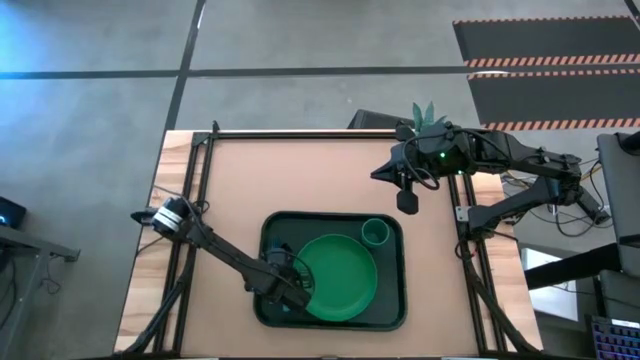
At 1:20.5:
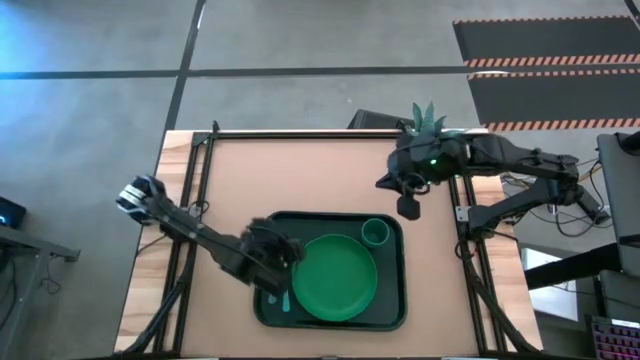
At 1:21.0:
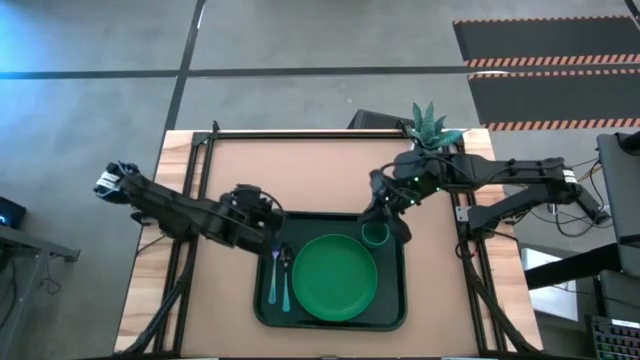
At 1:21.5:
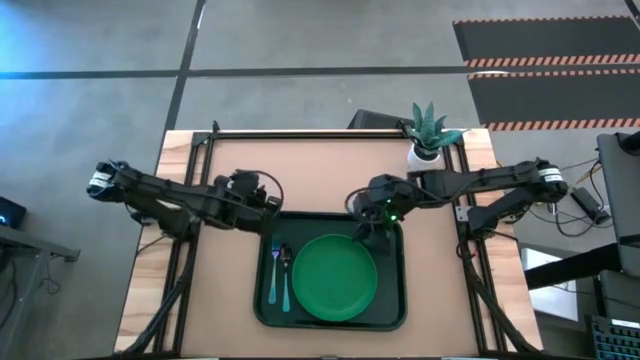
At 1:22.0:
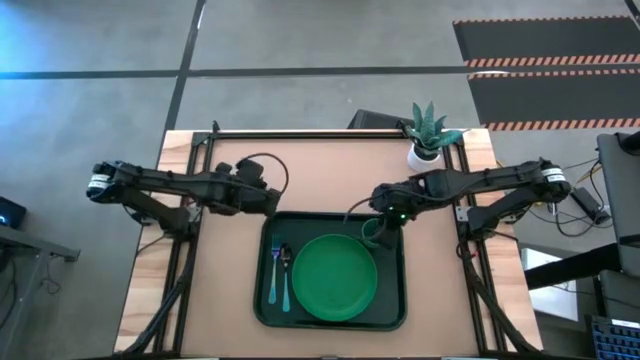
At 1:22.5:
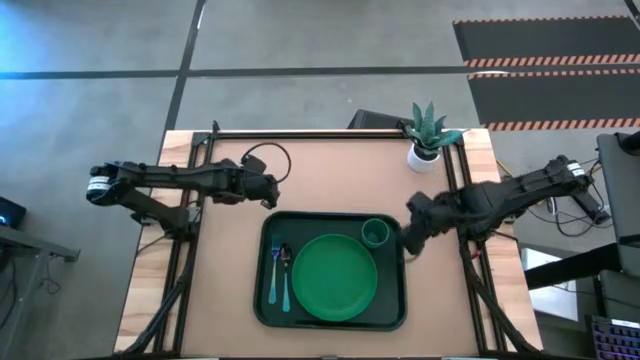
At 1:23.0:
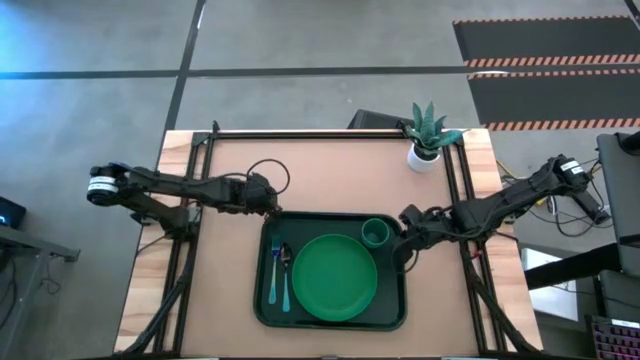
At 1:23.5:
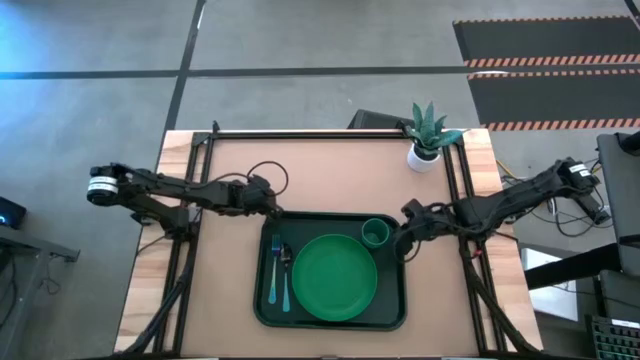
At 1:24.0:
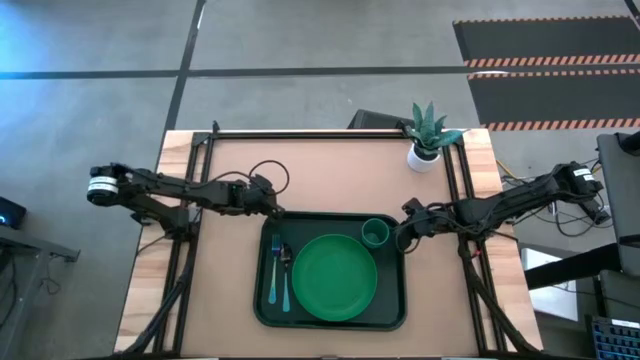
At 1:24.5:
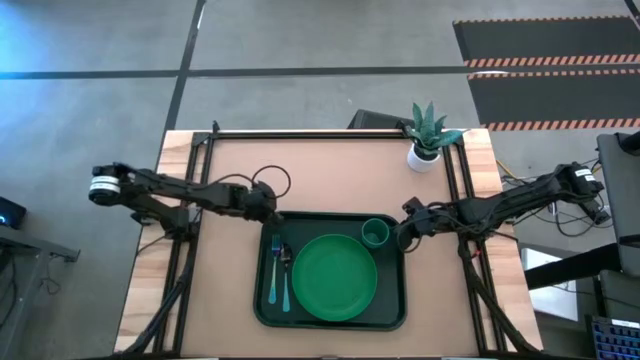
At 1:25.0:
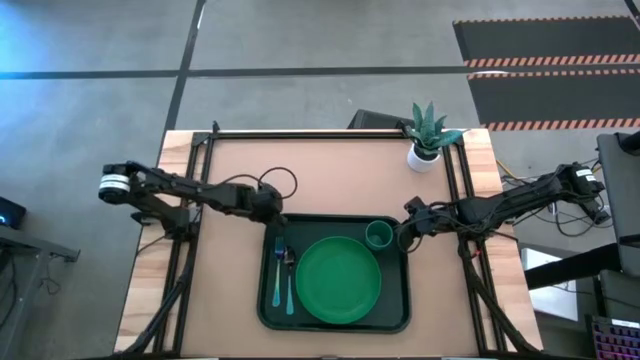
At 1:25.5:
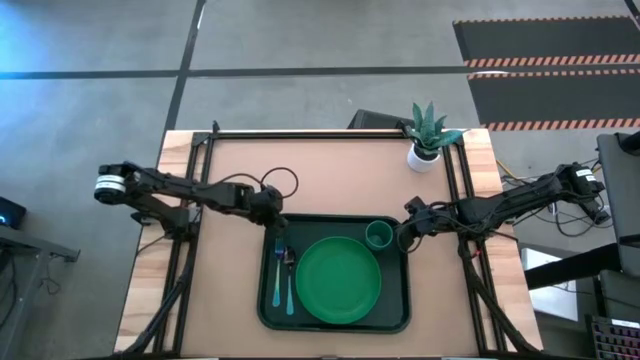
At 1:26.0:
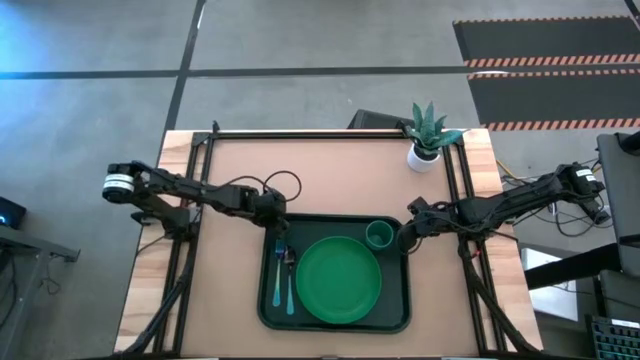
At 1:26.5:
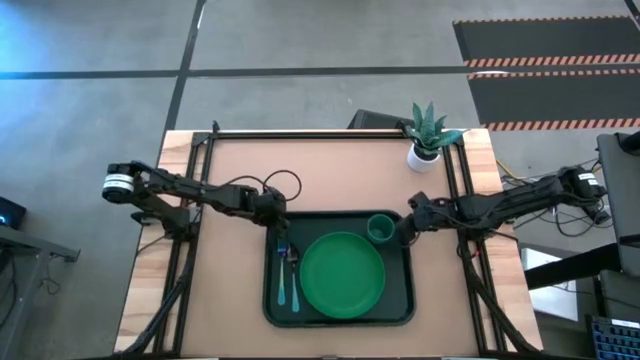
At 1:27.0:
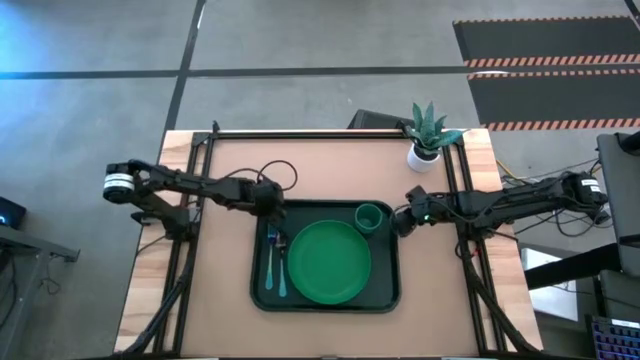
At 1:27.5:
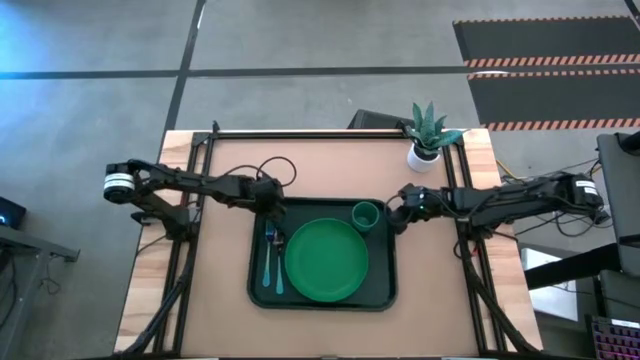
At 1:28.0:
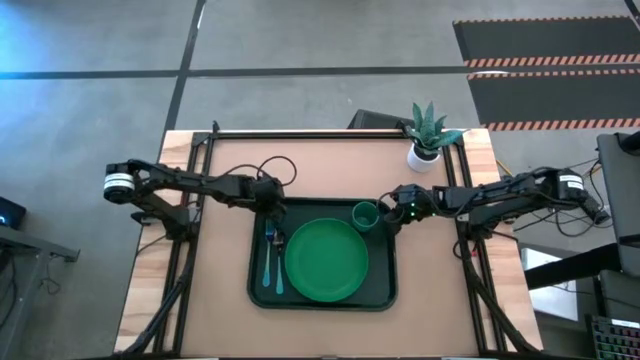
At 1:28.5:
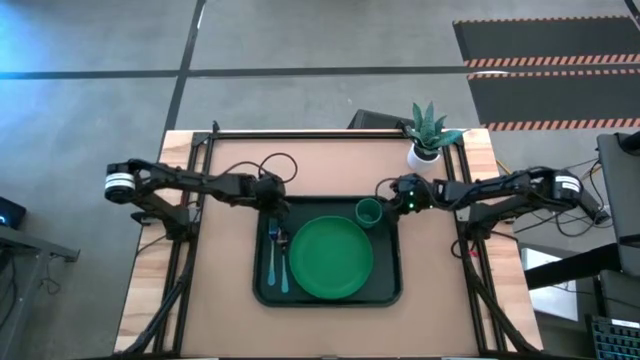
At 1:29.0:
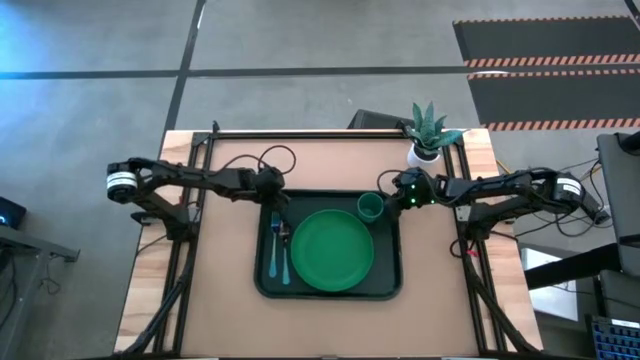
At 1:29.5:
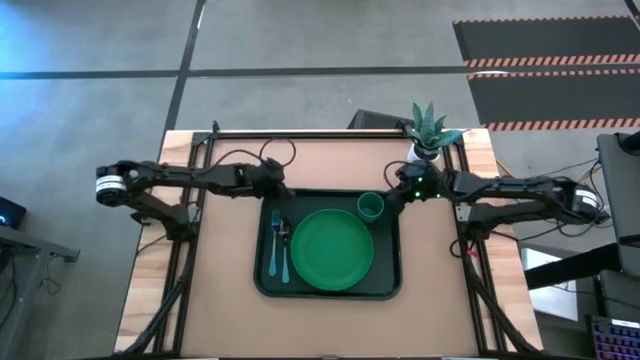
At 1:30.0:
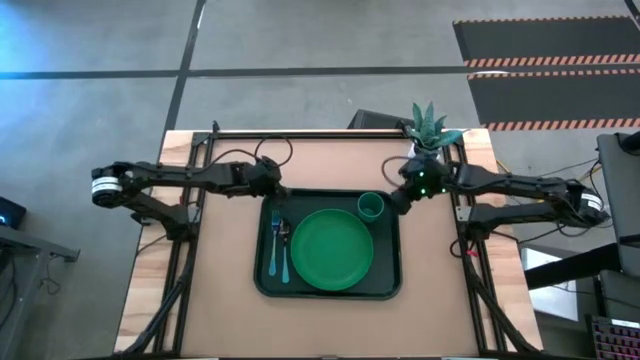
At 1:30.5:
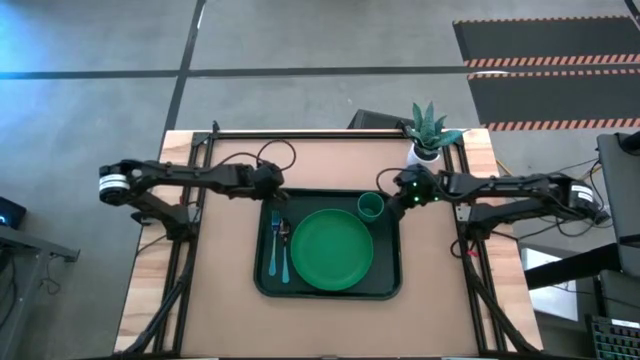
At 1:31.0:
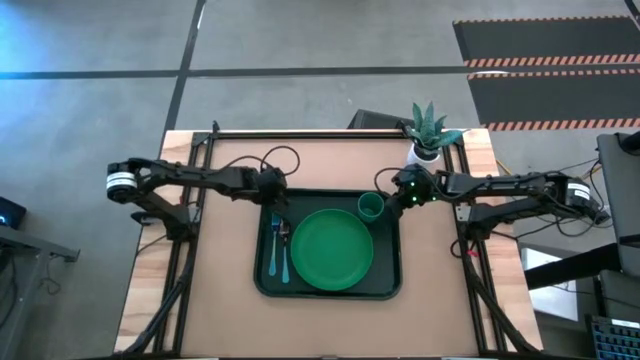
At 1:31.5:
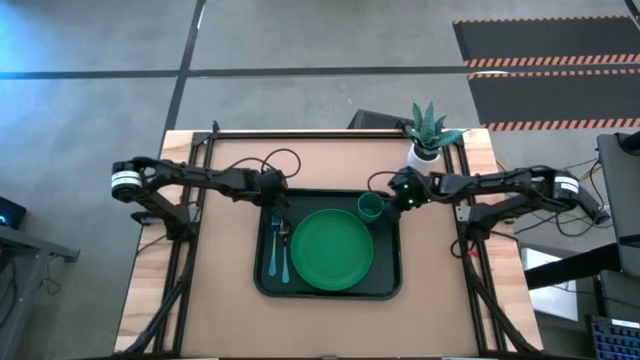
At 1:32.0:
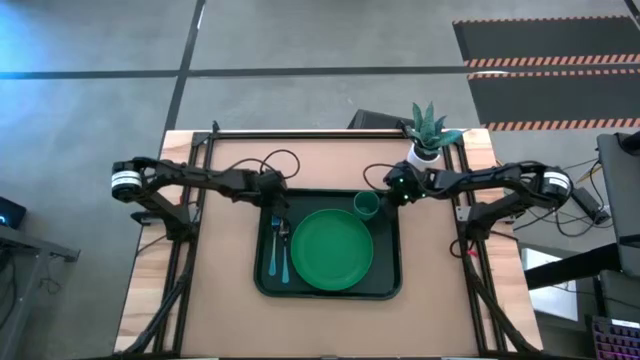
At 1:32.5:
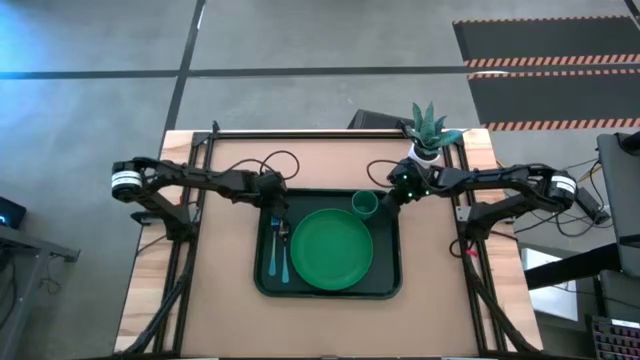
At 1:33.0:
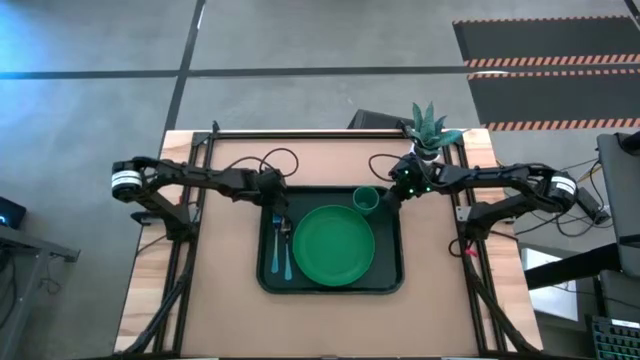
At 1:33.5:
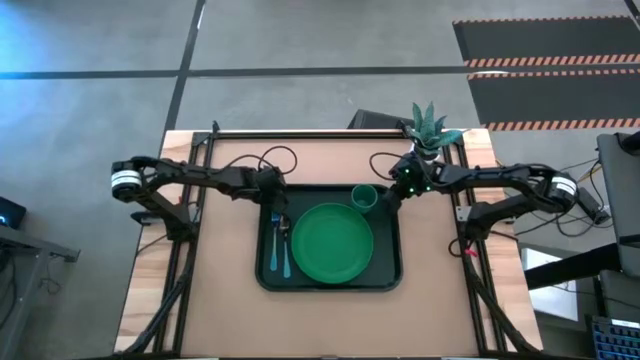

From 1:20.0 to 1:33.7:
Task: Pick and place plate/cup/fork/spoon on tray
Move the green tray to the center of the table

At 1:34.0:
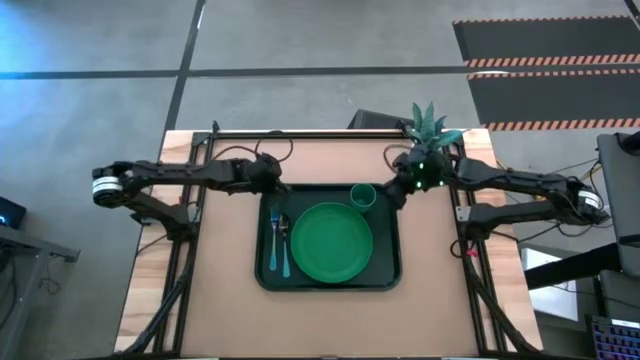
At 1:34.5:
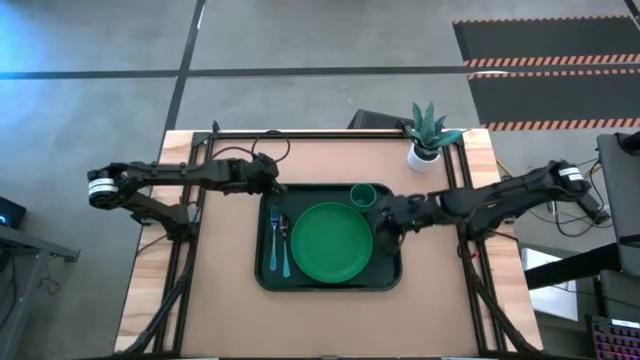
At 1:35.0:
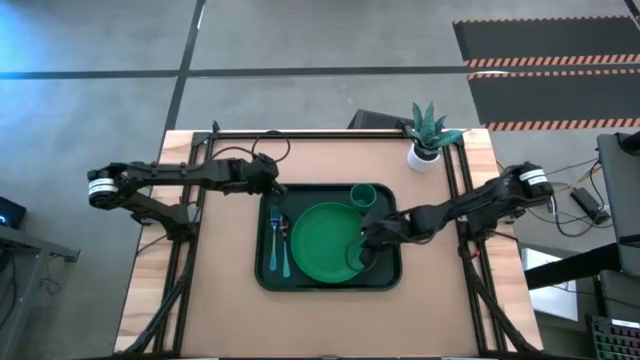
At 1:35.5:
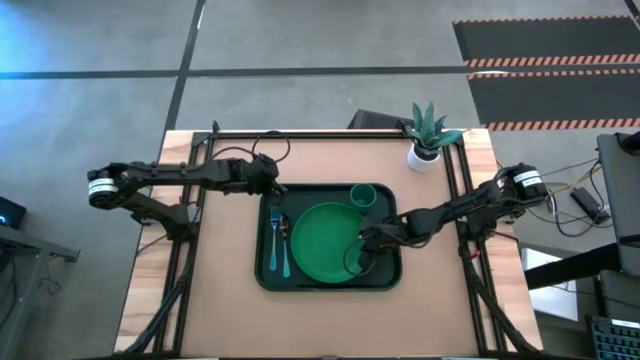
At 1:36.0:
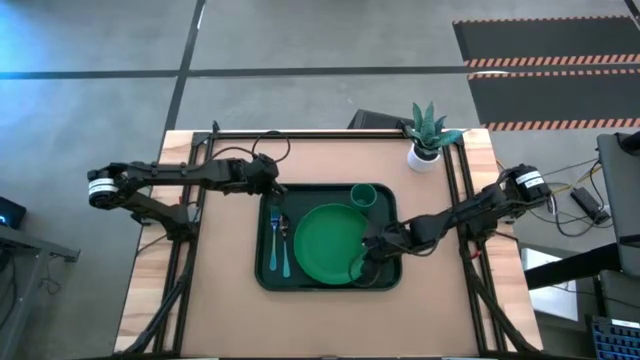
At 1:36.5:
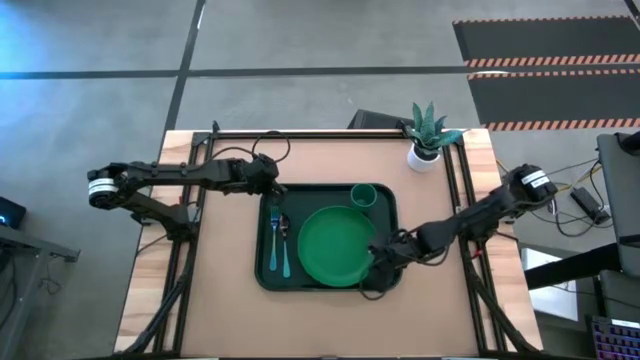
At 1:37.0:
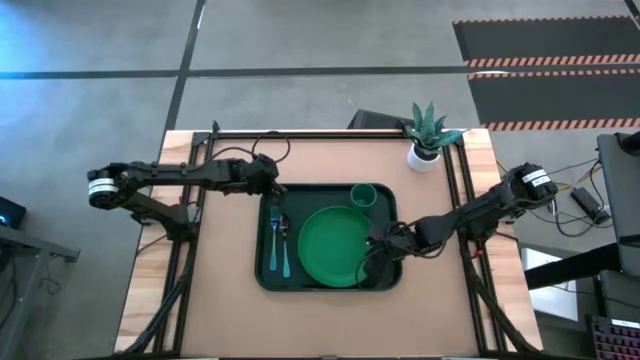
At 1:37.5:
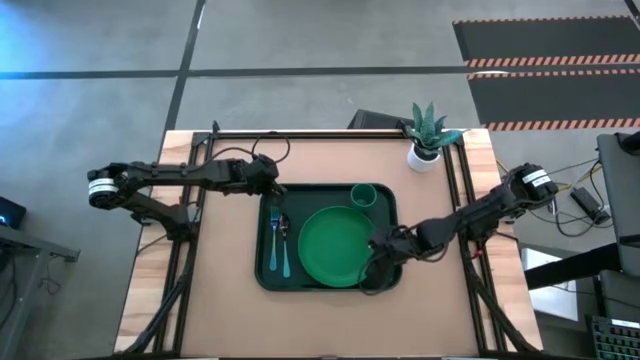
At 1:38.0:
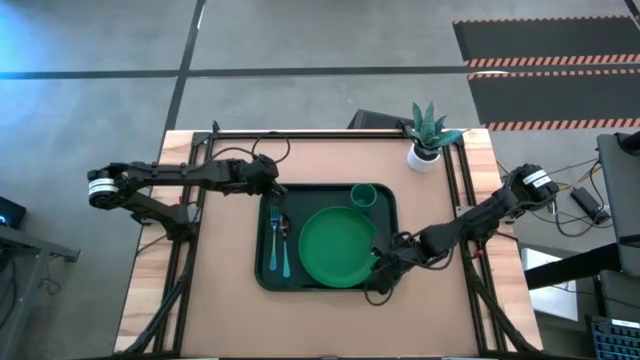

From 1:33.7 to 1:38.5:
Adjust the plate on the green tray

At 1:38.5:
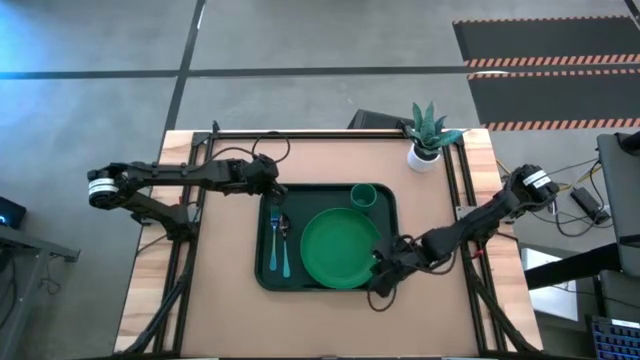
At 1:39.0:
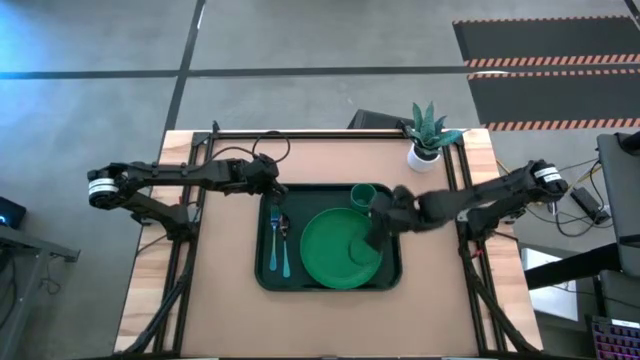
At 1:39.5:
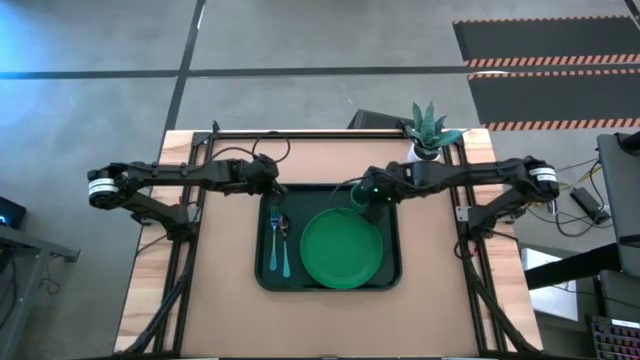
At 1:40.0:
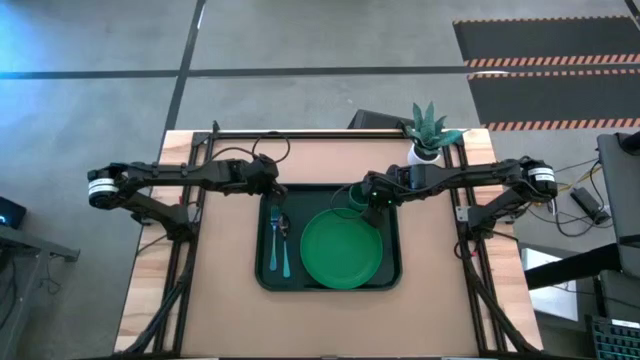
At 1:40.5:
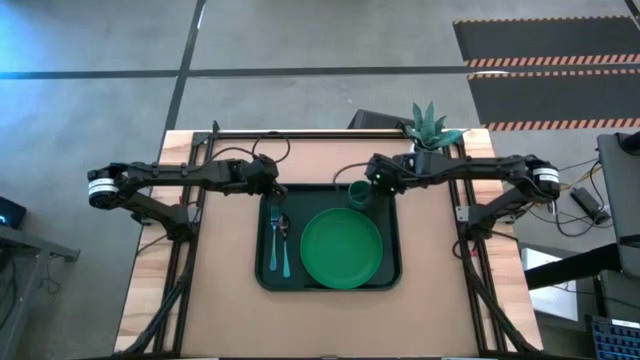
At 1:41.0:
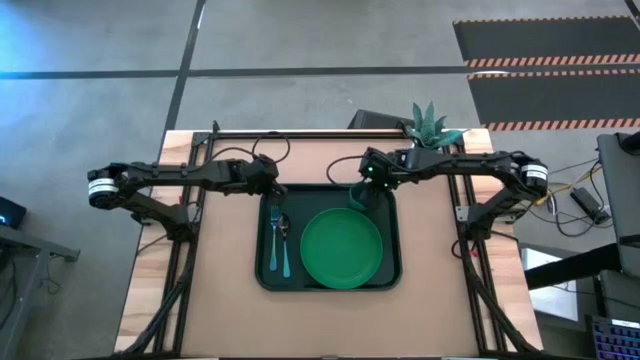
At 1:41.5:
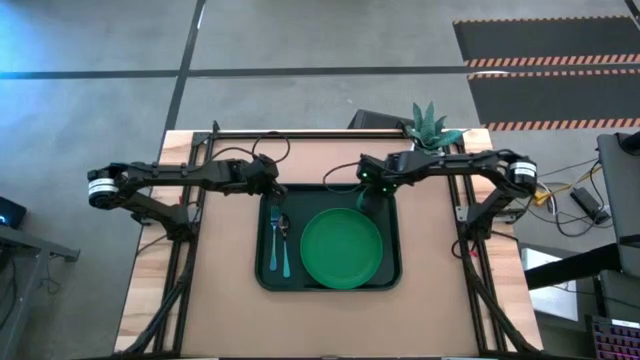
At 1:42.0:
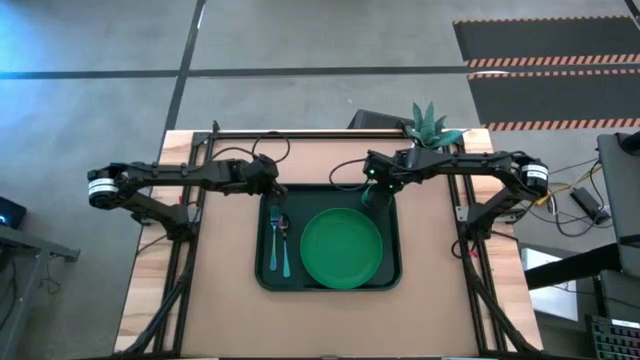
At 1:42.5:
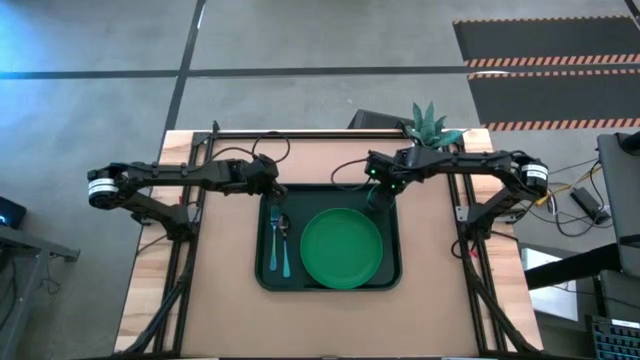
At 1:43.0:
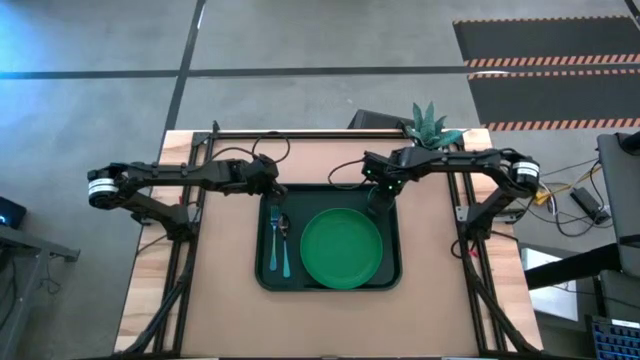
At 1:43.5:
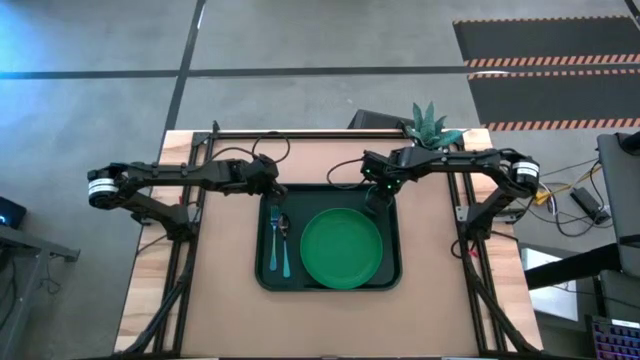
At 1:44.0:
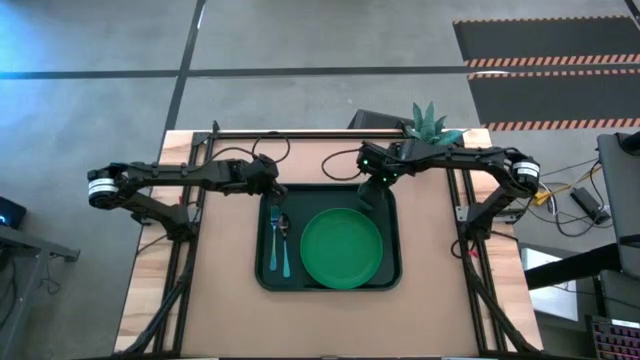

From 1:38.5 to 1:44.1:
Adjust the cup on the green tray
